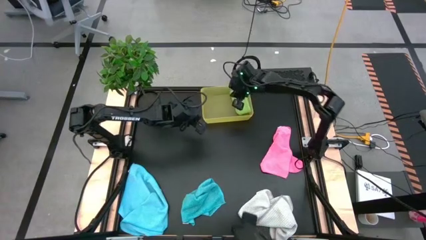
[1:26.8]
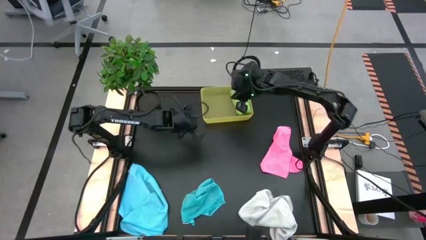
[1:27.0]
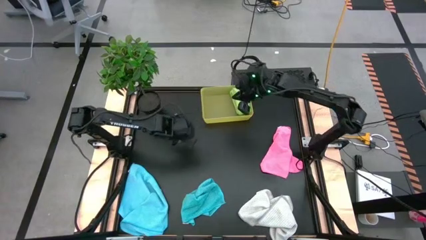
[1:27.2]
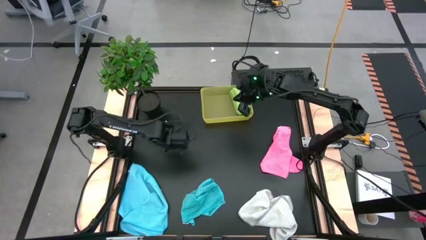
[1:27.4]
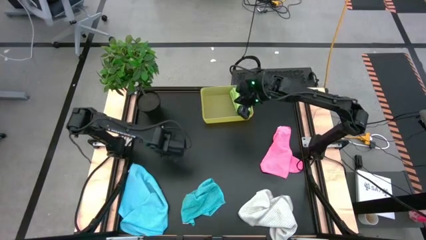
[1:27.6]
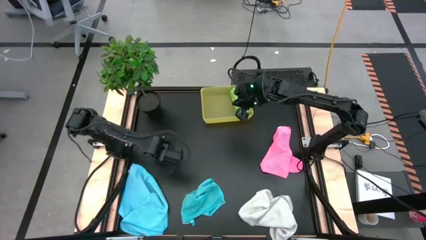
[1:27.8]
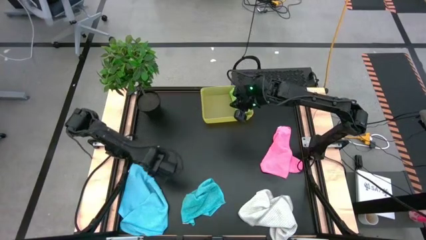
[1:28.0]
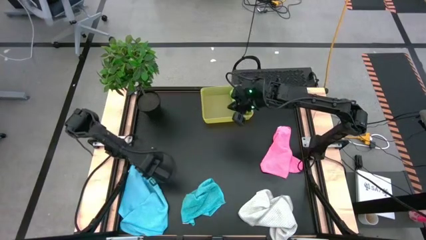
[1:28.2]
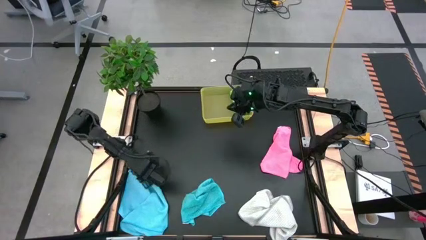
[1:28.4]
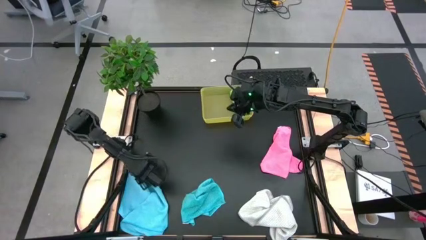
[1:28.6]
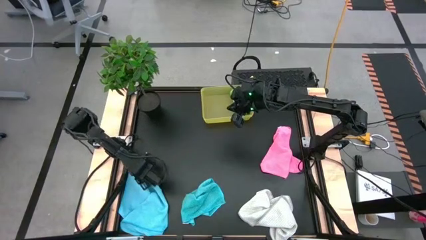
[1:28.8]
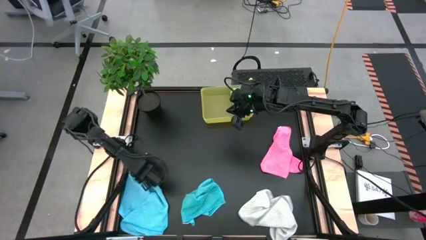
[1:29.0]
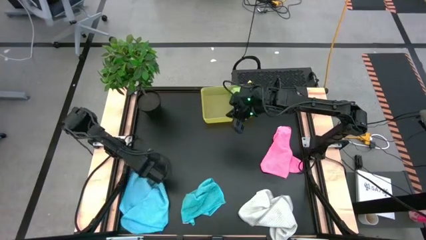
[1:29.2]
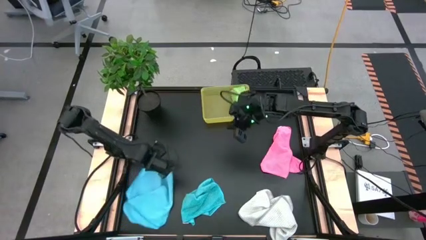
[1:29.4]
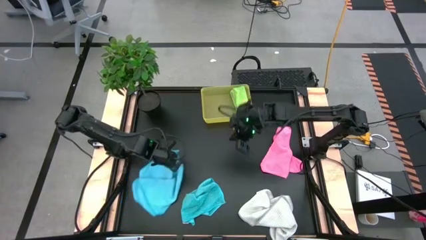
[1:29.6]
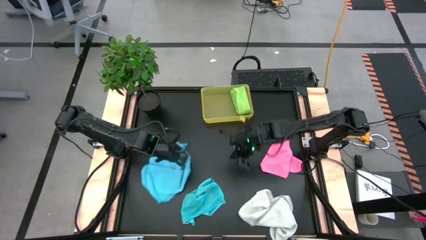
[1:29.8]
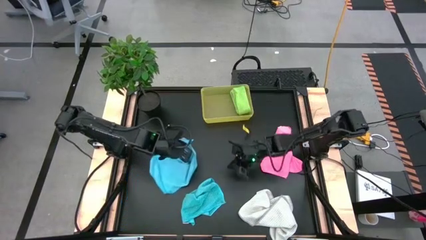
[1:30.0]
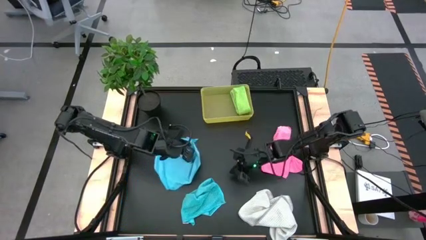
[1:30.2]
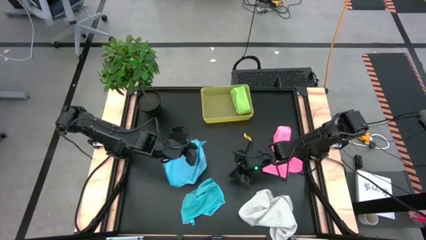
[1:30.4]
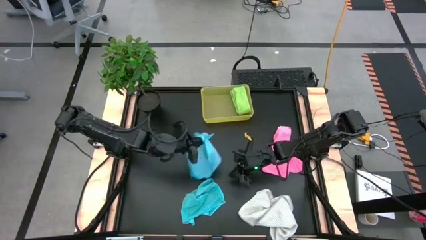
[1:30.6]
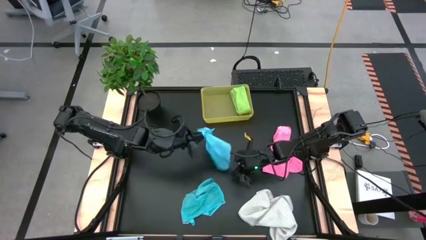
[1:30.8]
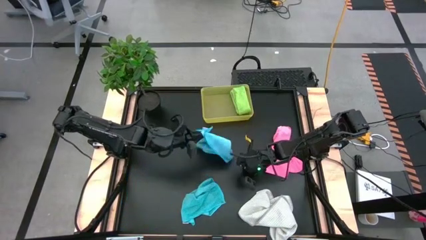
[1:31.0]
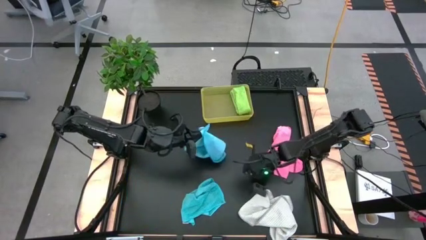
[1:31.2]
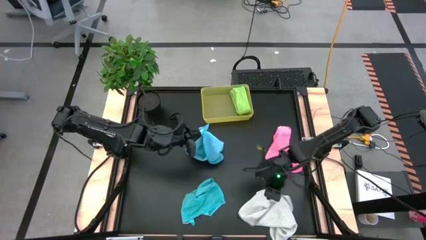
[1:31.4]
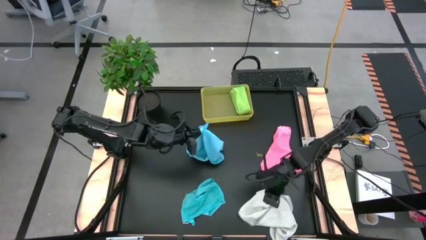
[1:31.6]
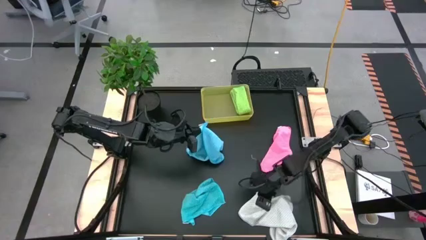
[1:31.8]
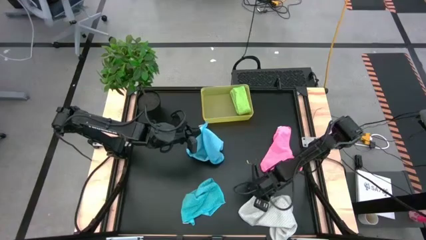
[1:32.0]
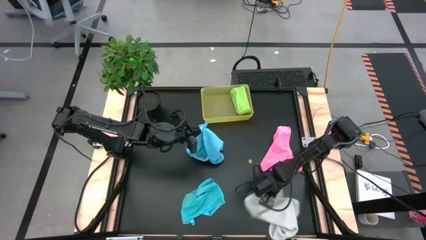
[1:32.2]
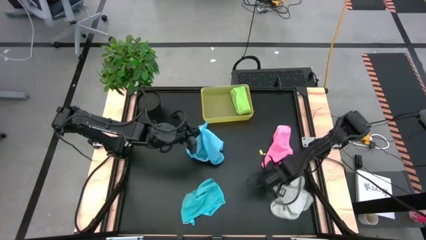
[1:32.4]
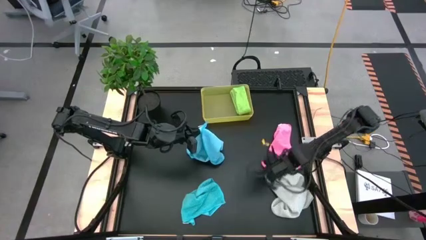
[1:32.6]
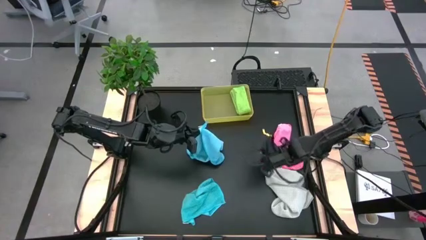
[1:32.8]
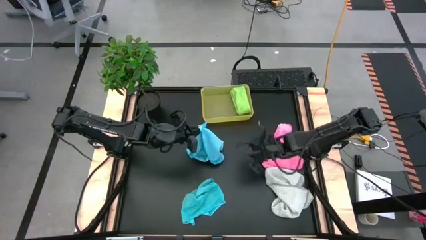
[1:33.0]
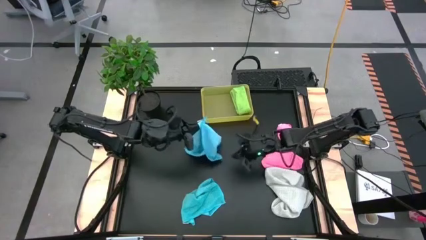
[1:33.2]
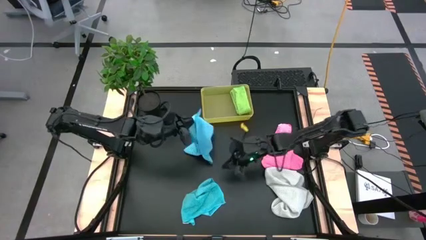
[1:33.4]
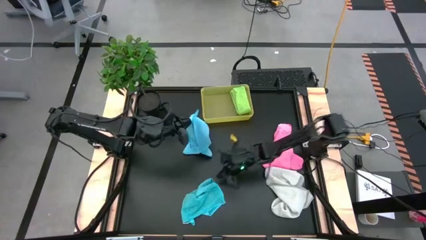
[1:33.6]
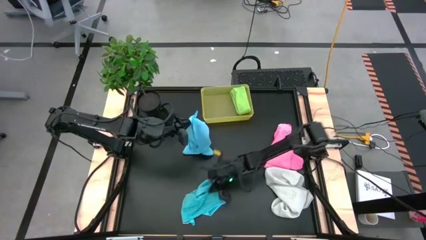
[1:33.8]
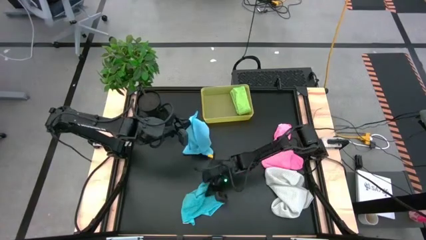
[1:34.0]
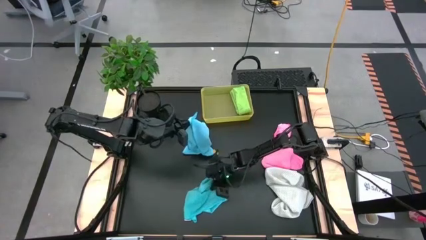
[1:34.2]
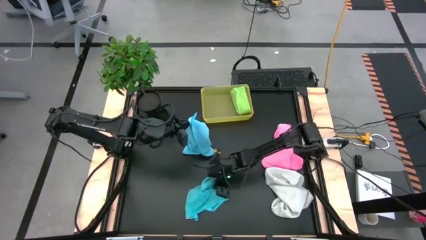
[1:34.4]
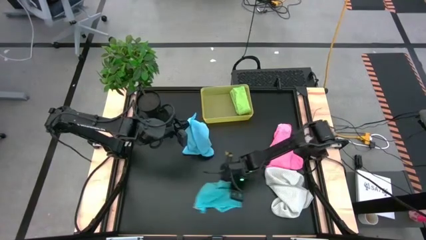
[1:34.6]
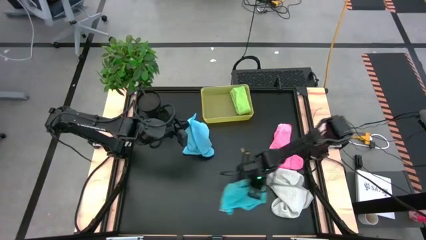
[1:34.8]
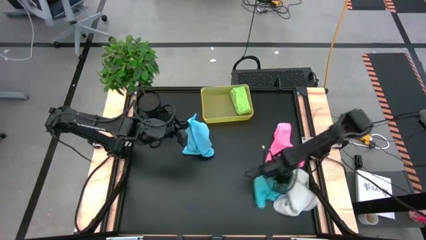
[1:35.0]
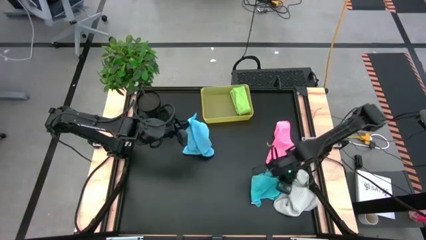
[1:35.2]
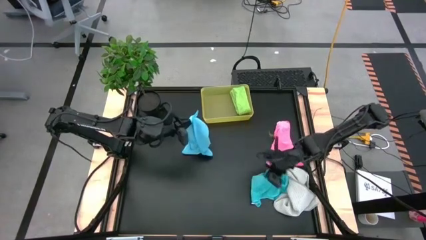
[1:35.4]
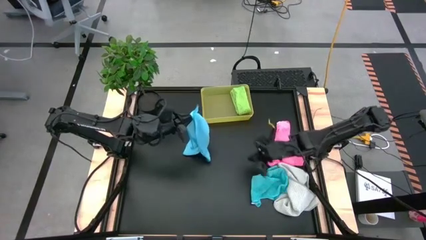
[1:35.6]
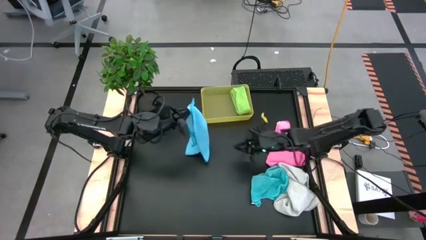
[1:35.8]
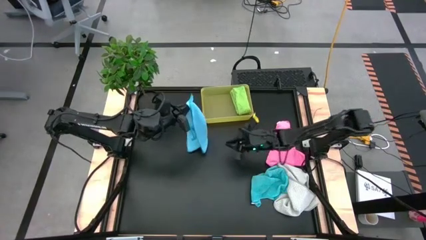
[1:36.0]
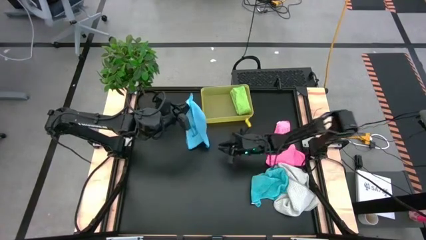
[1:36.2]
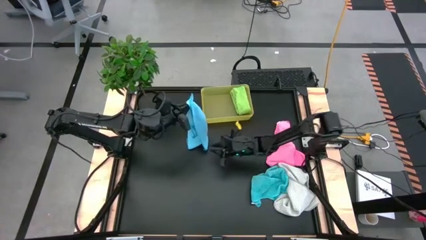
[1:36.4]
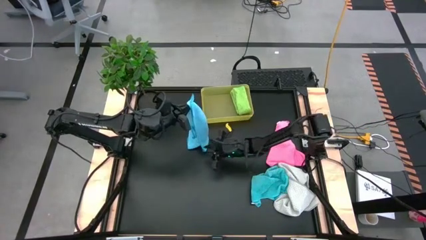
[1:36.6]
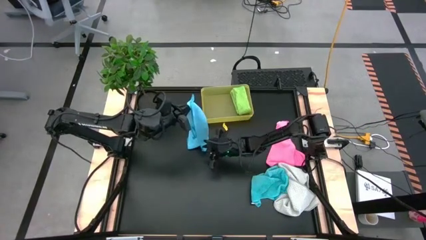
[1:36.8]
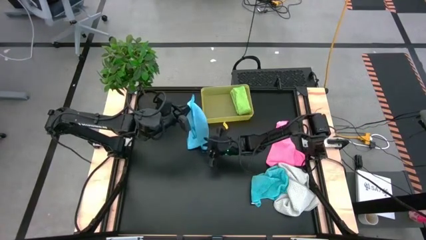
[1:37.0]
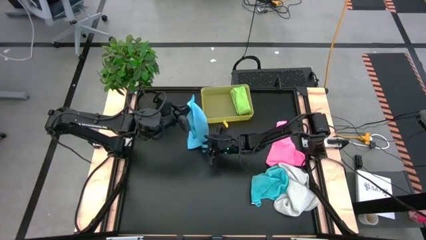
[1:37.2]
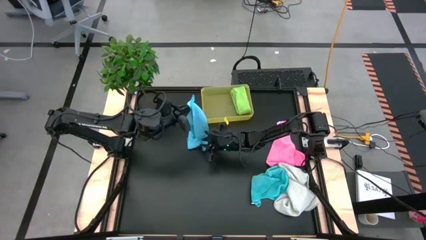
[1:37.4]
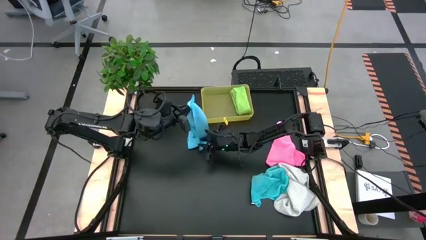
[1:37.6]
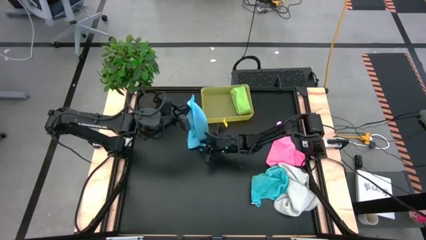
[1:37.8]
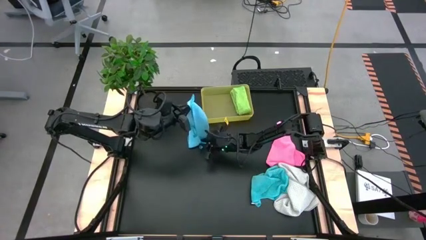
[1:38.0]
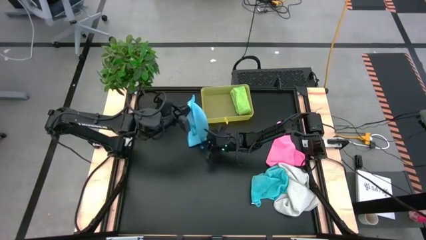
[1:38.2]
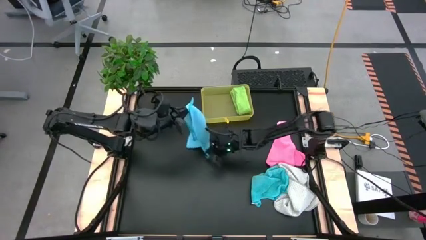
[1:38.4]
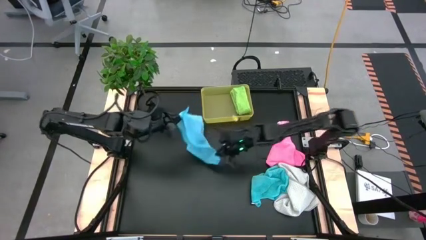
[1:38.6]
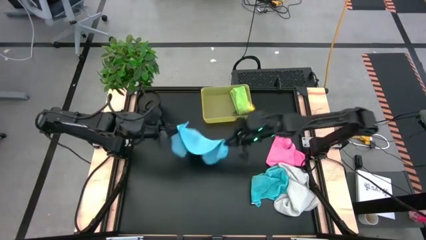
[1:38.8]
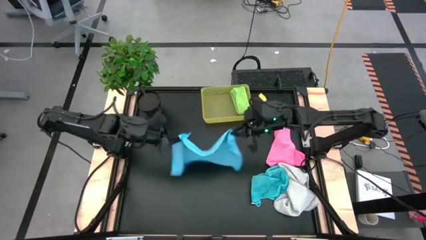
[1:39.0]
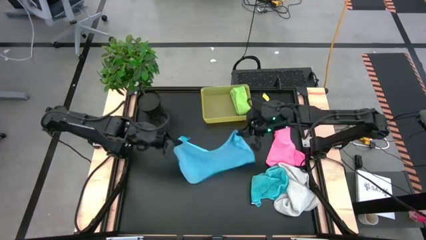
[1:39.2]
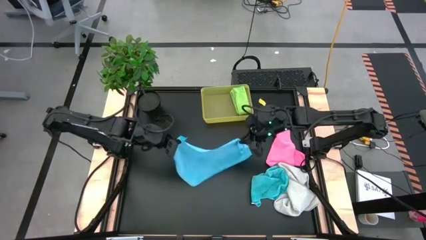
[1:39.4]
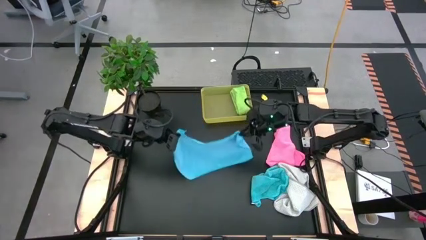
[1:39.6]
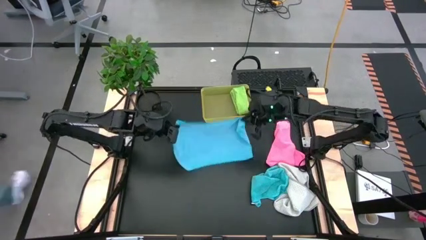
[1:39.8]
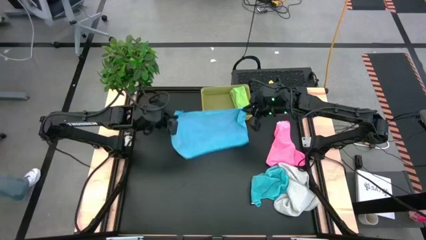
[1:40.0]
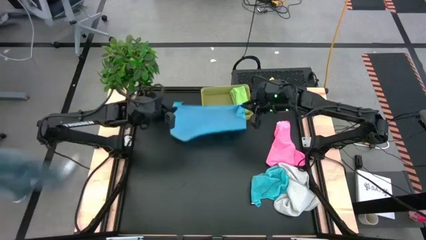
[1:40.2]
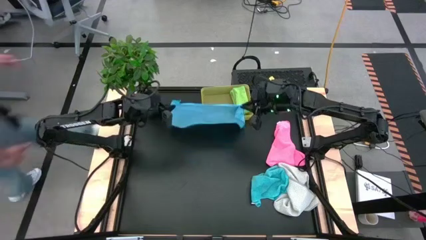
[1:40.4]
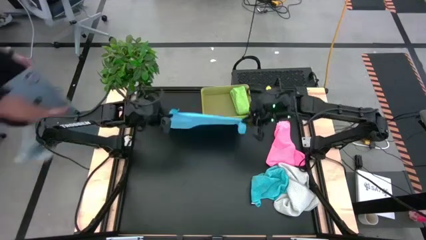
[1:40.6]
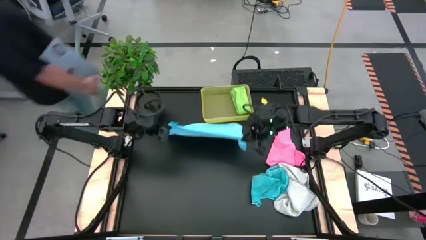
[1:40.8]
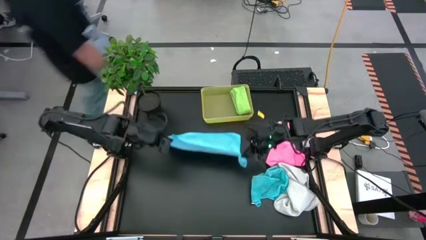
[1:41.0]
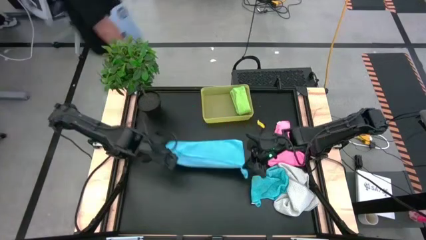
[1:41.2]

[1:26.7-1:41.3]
Task: Fold microfiber towels
Fold the left blue microfiber cloth
